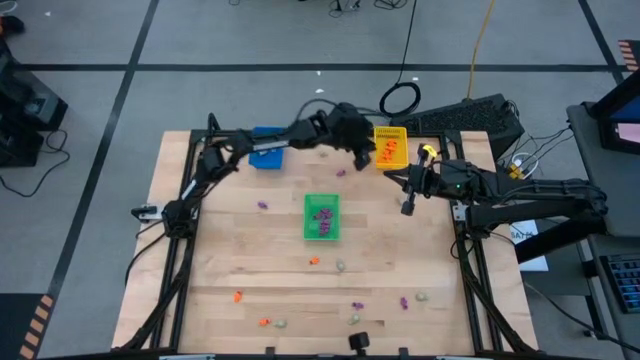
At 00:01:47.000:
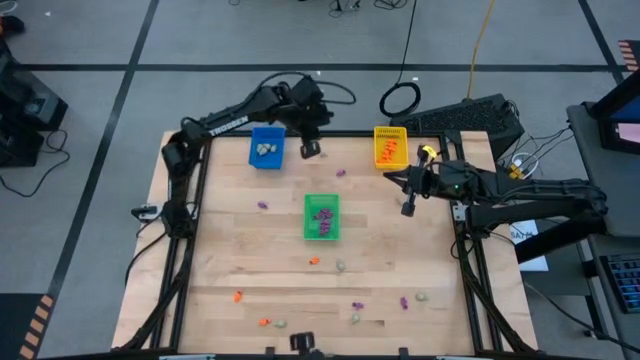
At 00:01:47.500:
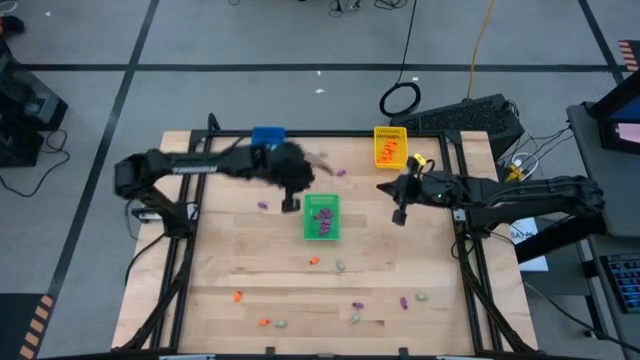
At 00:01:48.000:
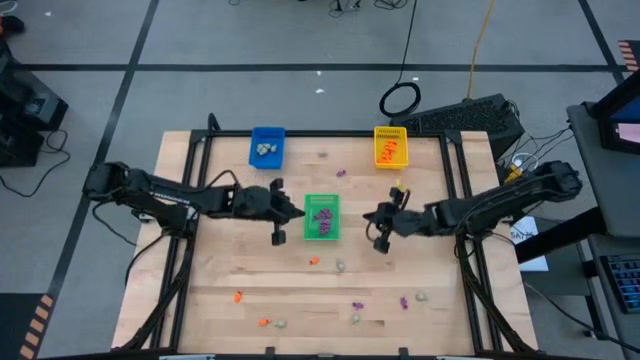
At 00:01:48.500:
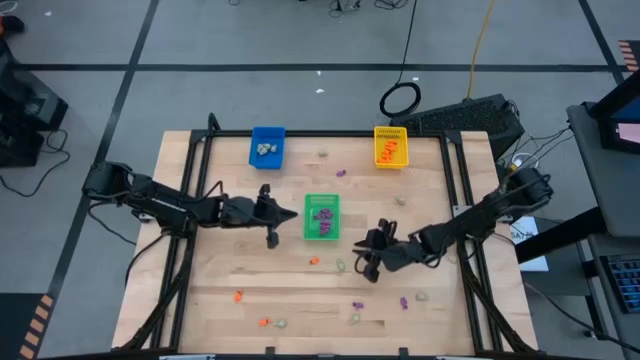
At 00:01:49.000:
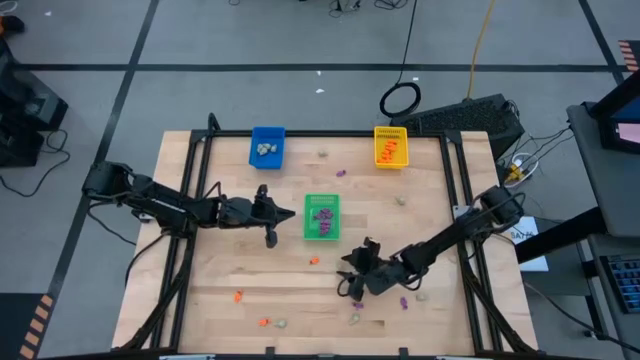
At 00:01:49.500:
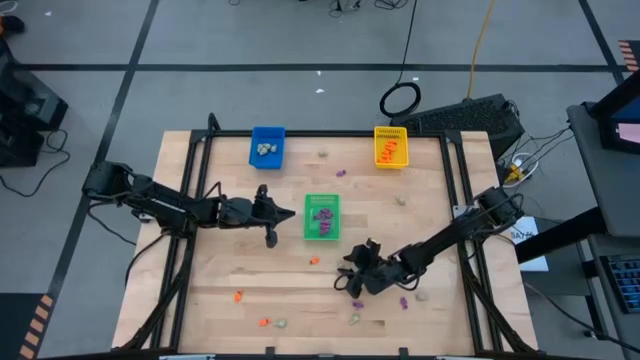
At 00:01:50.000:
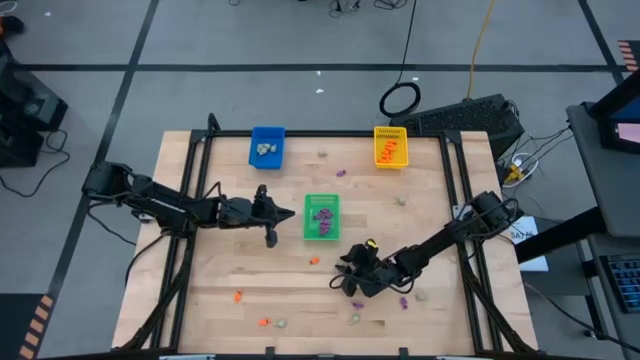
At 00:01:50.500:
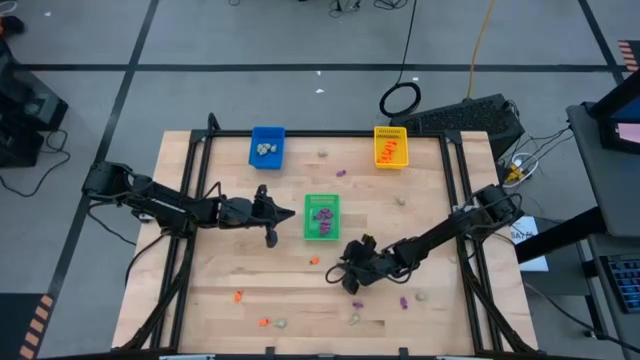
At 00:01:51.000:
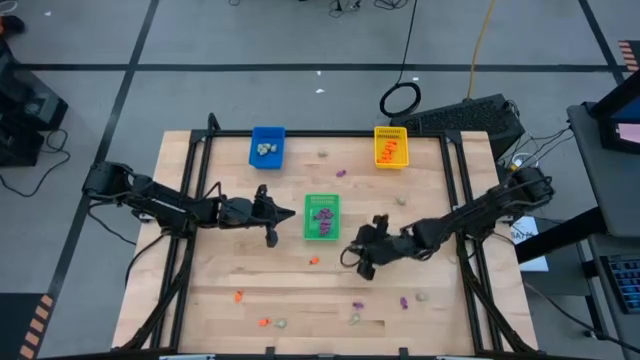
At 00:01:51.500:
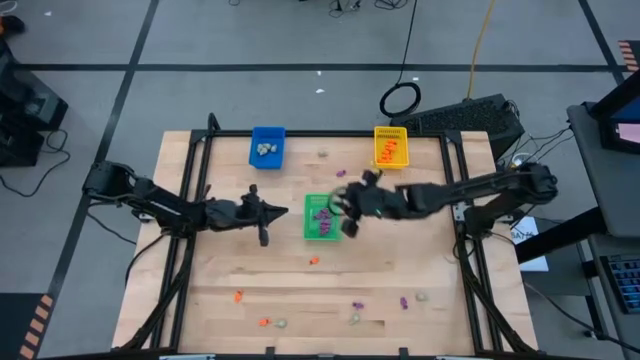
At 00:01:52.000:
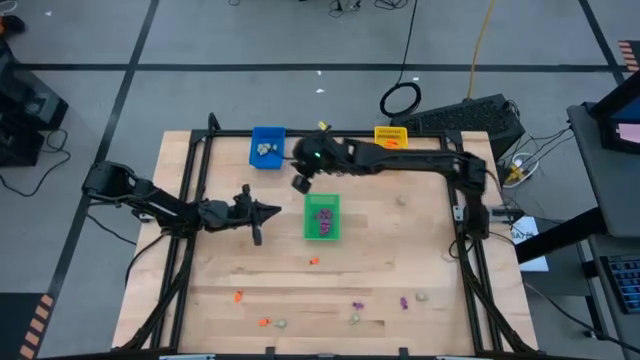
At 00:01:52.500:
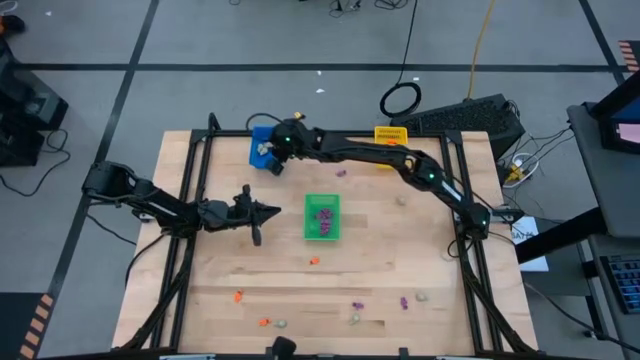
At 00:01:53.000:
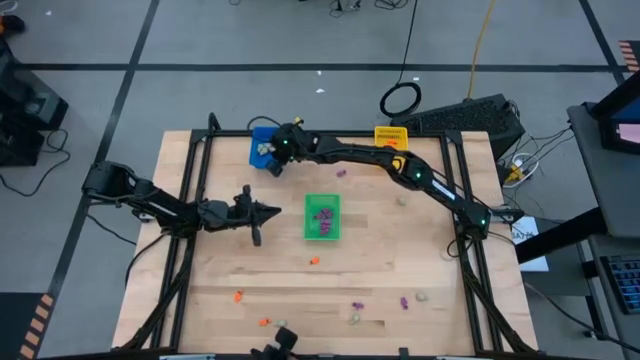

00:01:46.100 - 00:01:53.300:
Task: Sort Halloween decoration
Put the white skull toy into the blue bin

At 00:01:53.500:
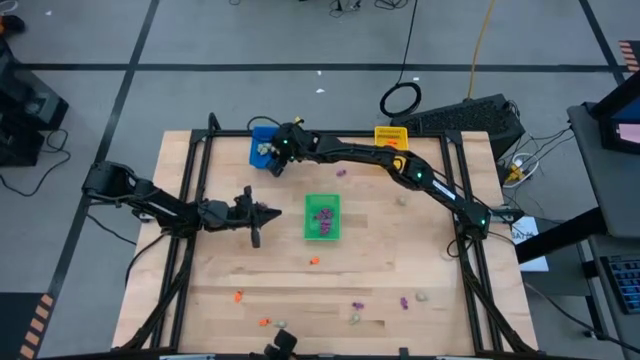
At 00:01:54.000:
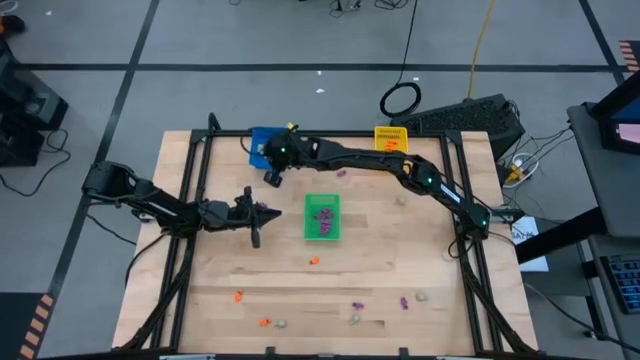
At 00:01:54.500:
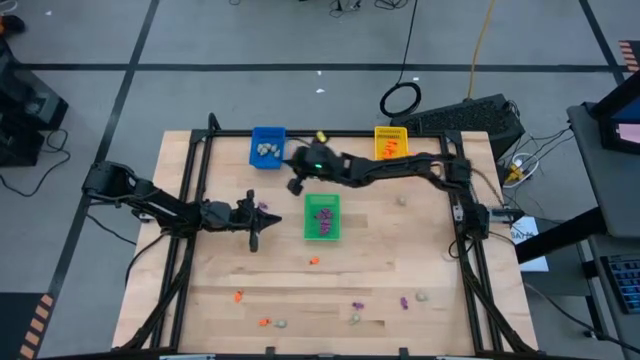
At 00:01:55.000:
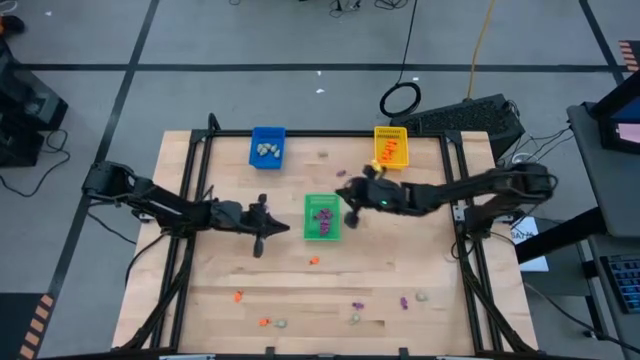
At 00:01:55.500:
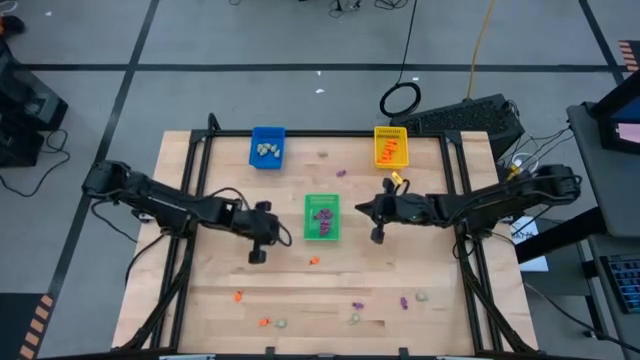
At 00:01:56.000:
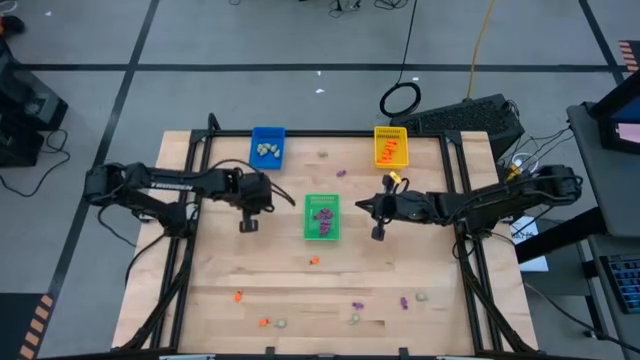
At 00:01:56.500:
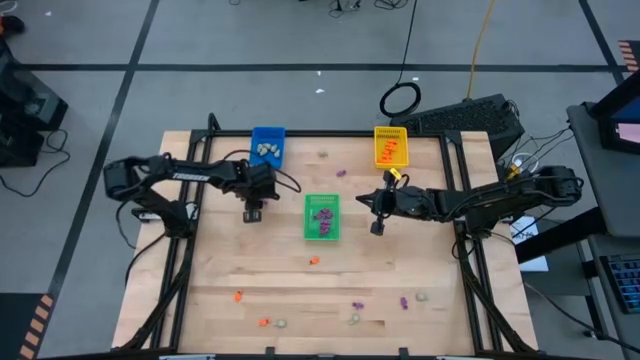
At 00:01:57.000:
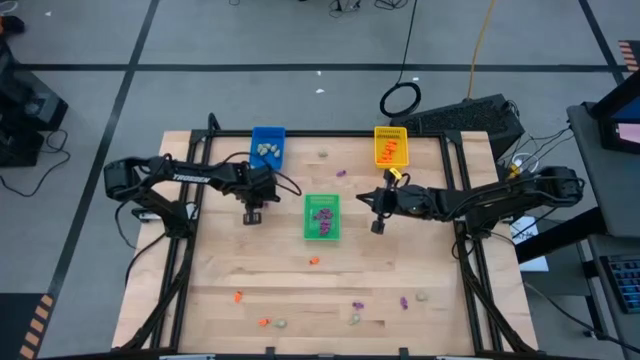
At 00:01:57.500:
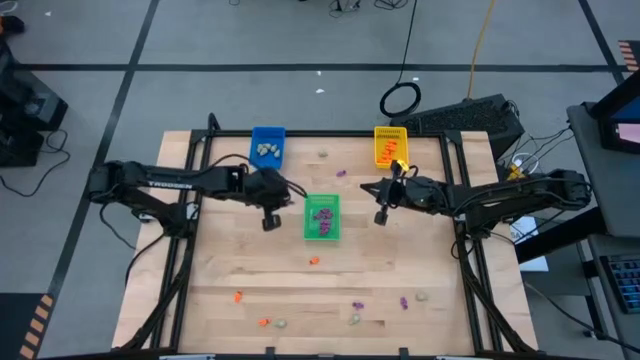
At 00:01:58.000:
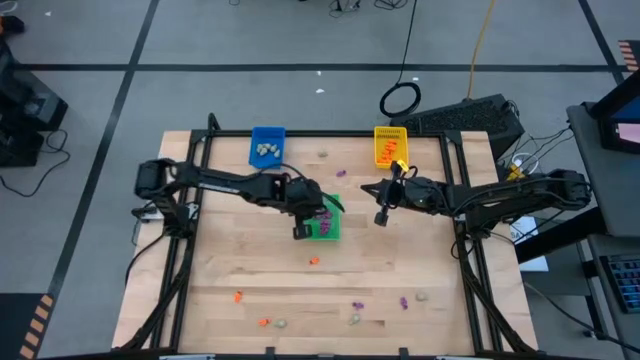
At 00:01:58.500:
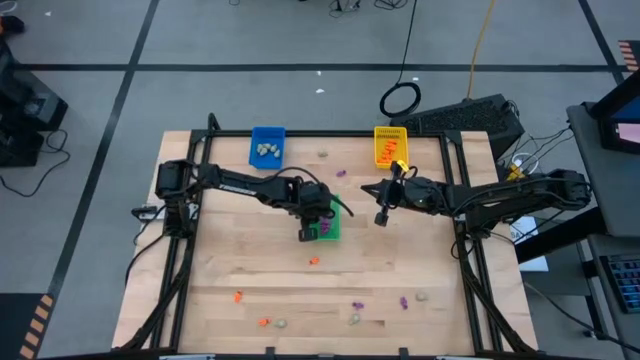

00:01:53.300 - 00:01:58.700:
Put the purple skeleton toy into the green bin

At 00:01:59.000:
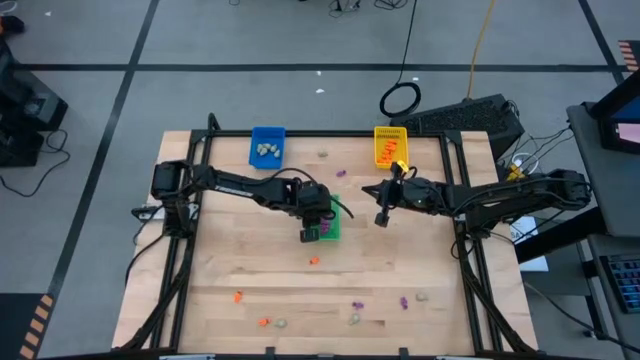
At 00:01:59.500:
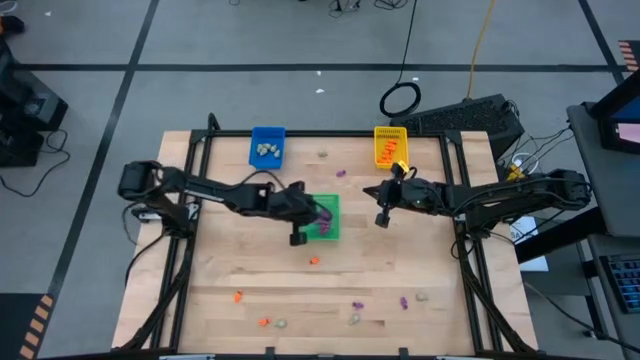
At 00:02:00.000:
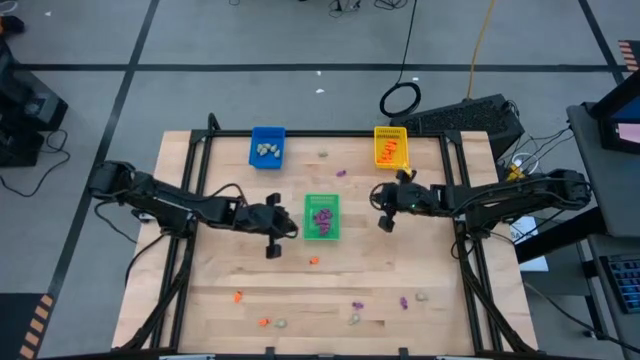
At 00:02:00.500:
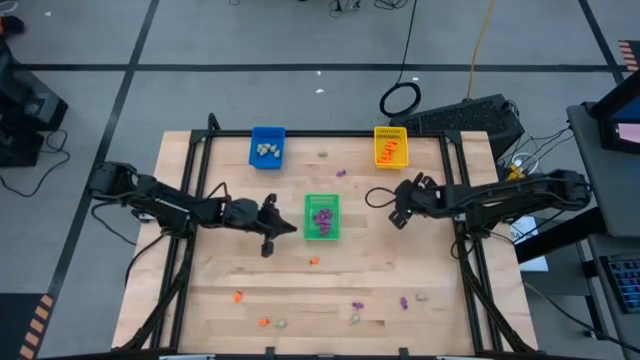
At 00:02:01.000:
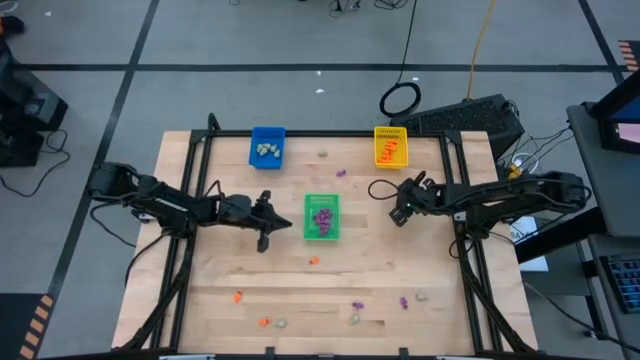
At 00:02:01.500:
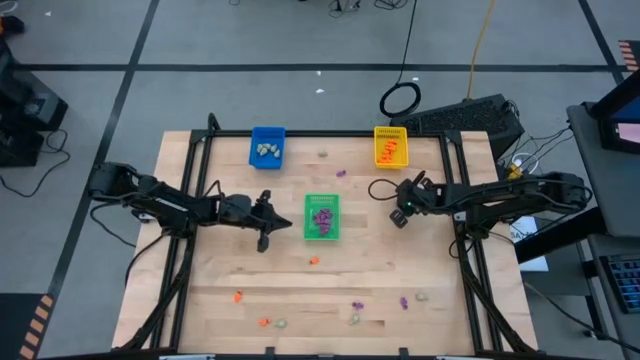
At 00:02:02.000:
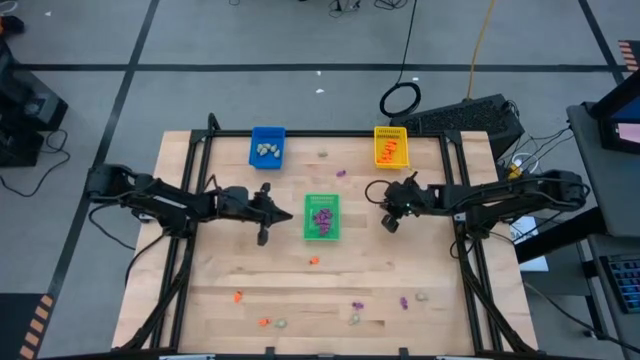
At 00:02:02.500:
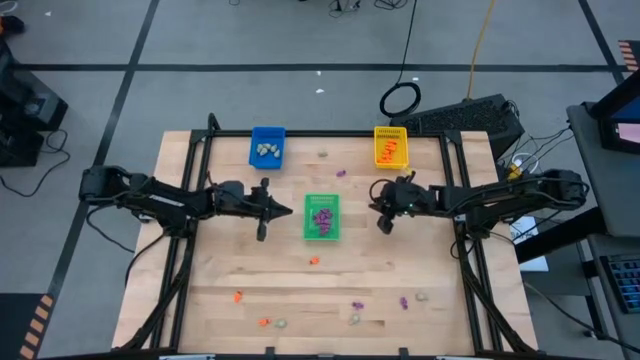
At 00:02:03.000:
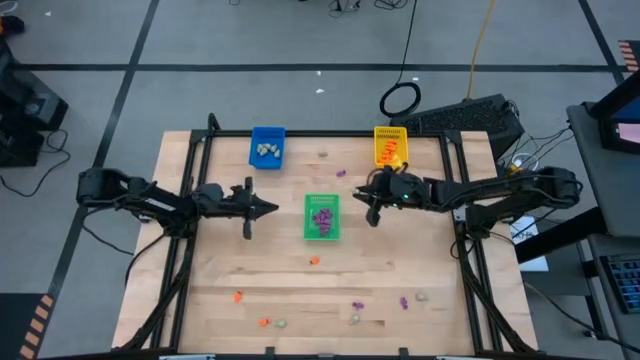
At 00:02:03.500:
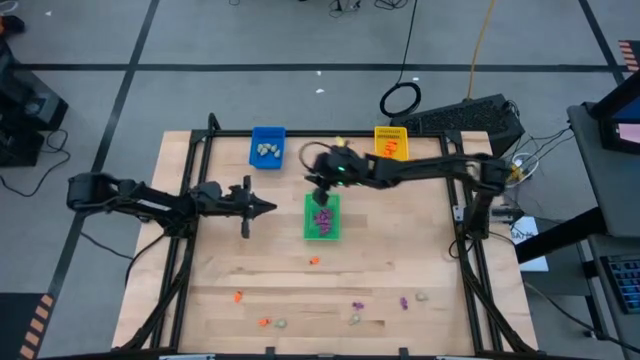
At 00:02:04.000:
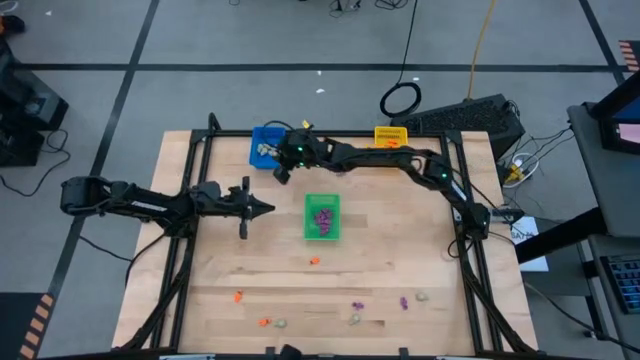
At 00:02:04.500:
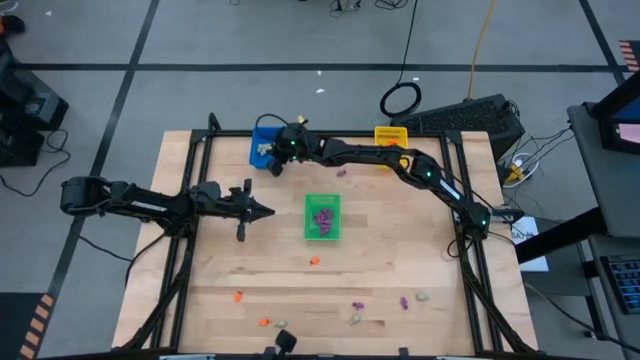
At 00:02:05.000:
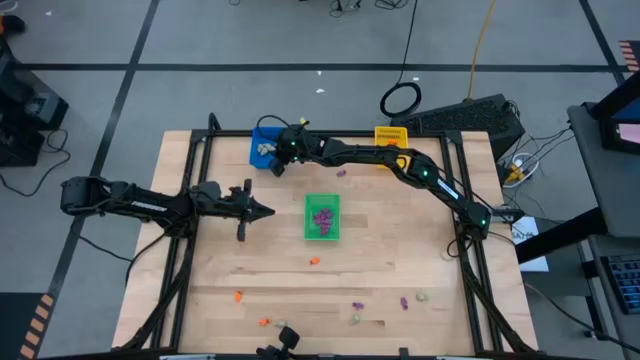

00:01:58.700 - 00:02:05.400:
Put the white skull toy into the blue bin

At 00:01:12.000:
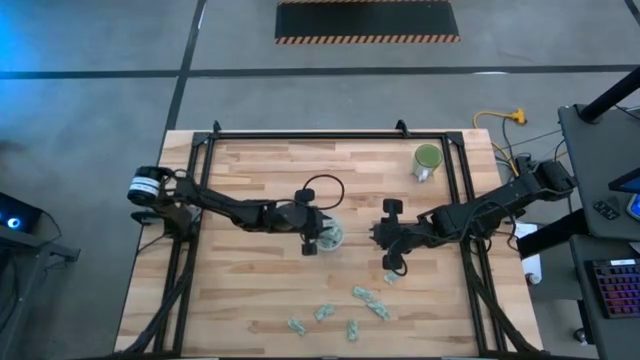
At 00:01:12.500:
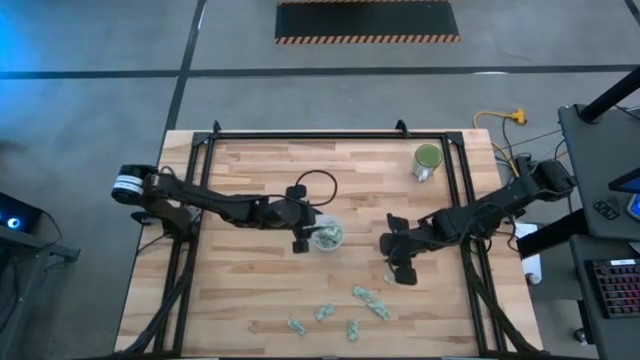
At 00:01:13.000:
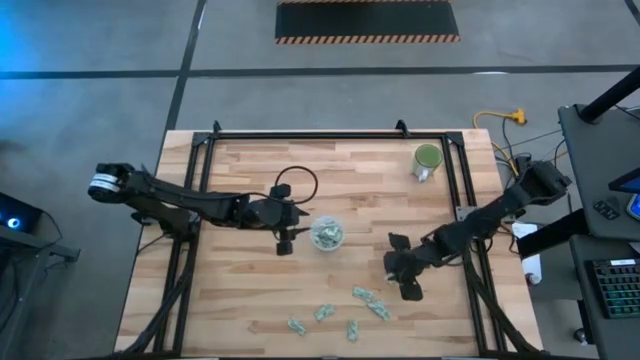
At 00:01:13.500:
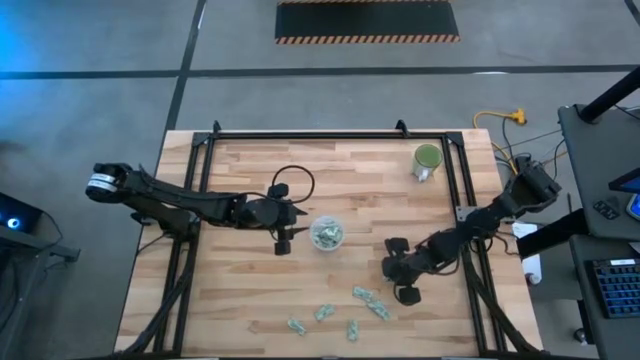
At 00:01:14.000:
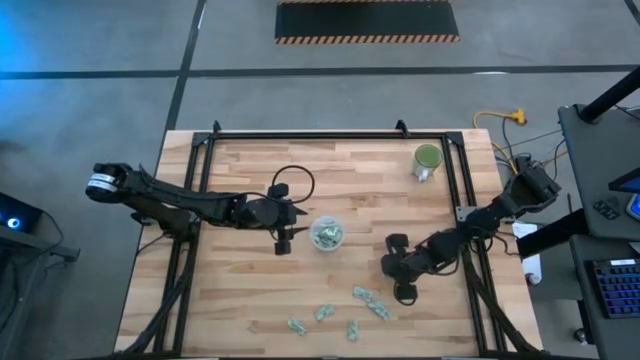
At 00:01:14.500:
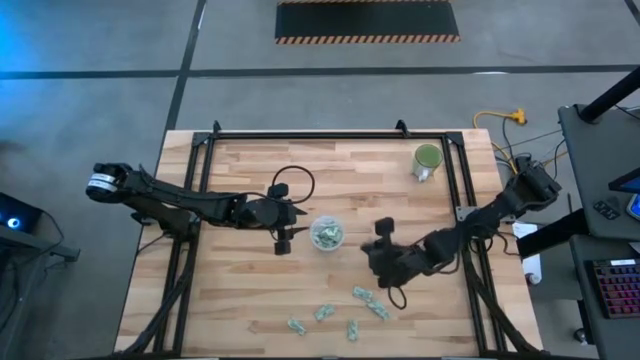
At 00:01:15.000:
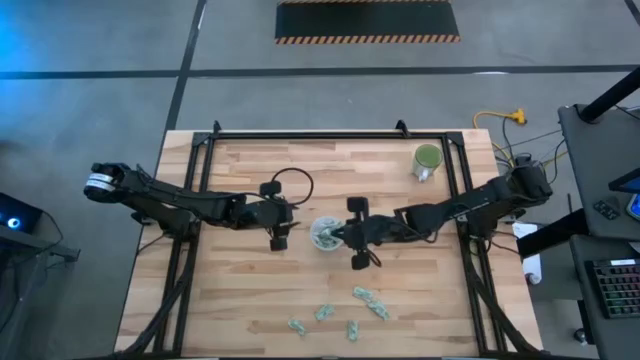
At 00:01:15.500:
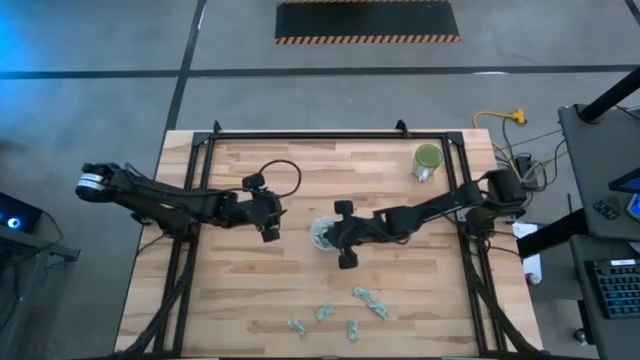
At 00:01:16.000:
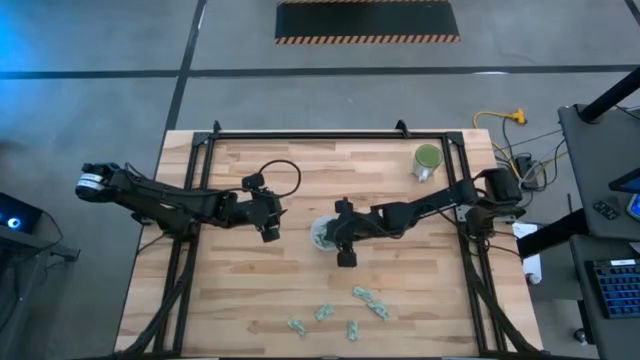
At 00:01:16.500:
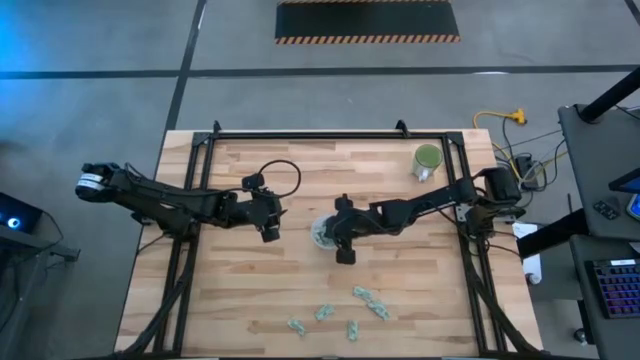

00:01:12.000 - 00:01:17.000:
Task: Pick and place Stevia / Truvia into bins
Put the light green stevia packet into the transparent container
